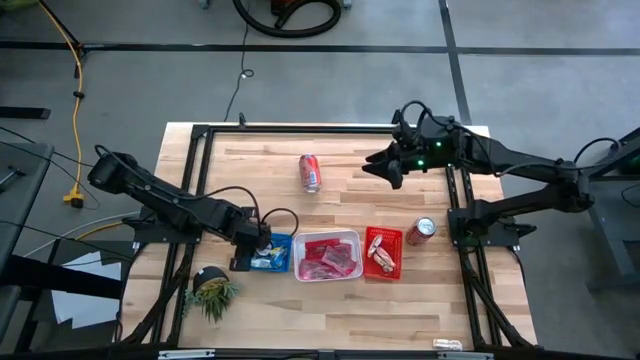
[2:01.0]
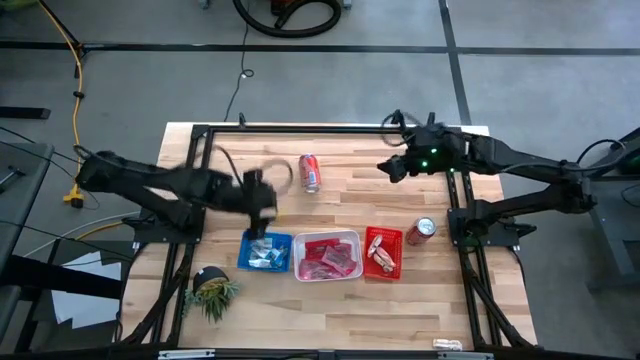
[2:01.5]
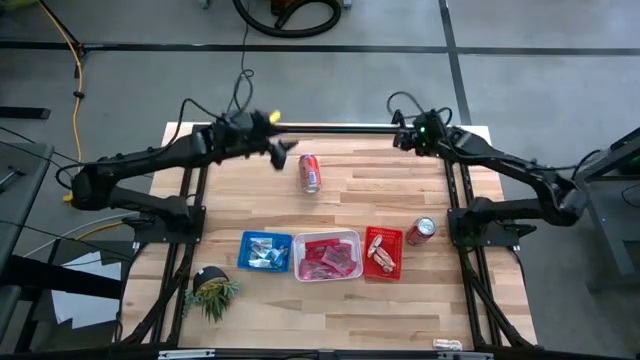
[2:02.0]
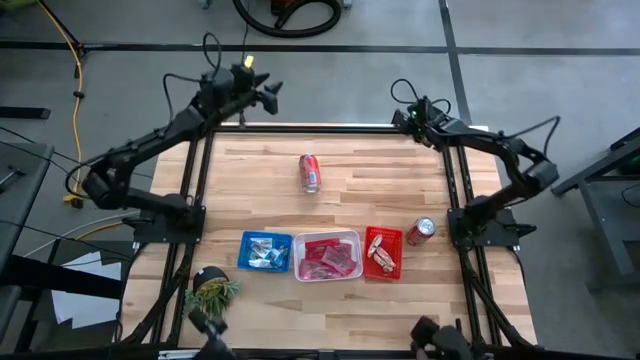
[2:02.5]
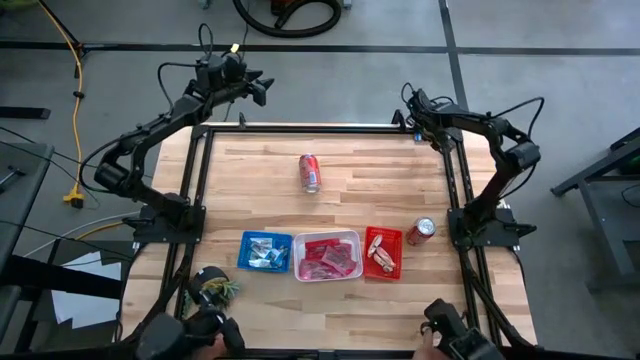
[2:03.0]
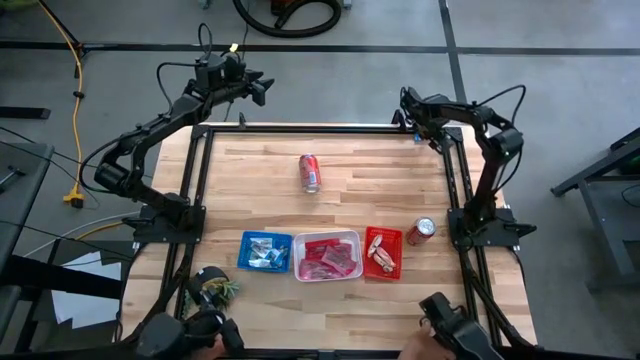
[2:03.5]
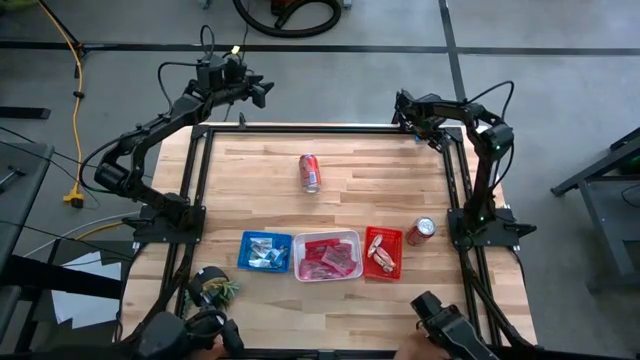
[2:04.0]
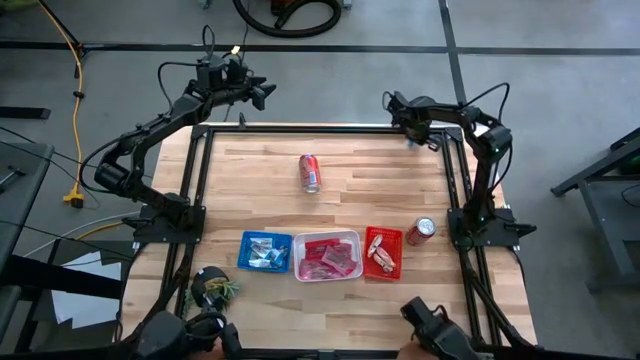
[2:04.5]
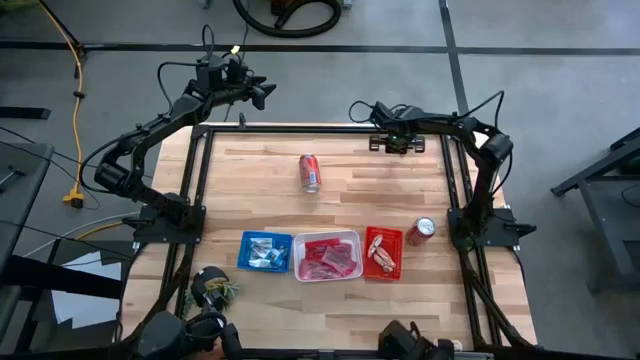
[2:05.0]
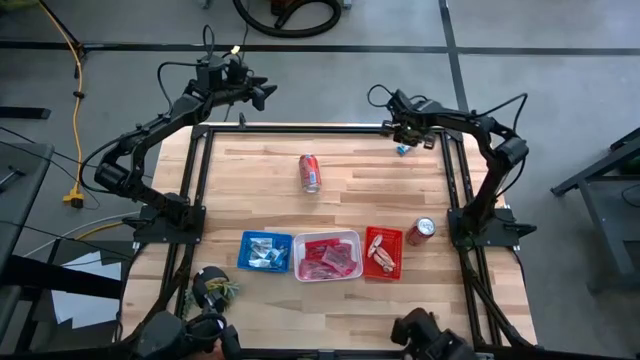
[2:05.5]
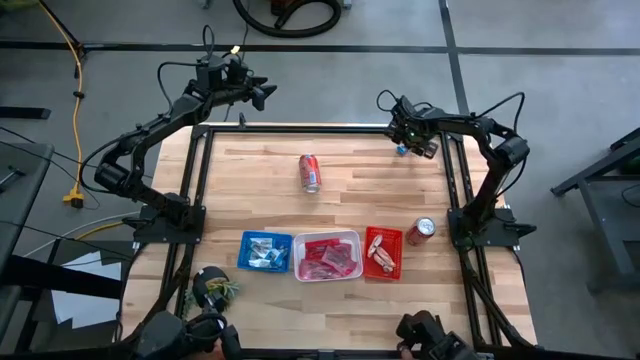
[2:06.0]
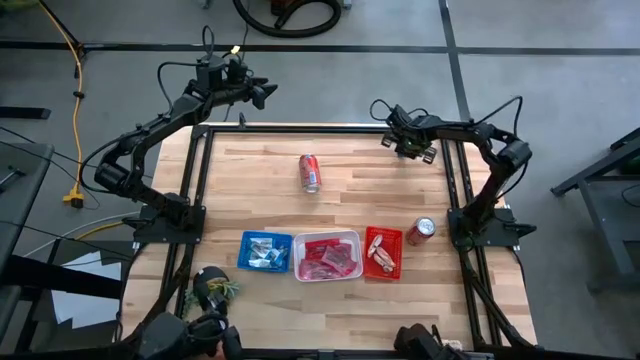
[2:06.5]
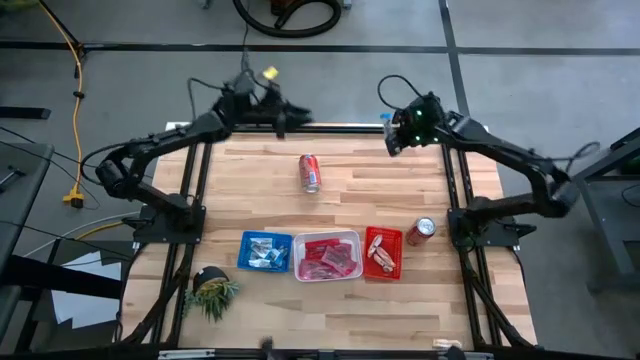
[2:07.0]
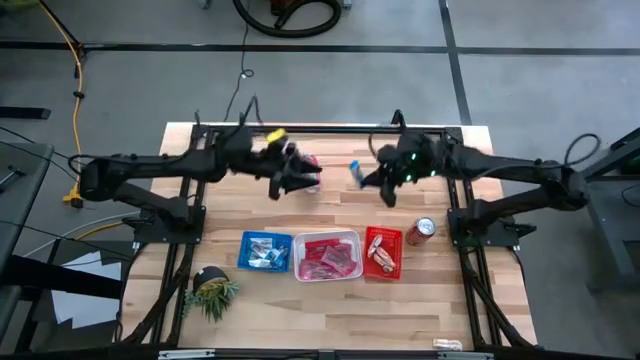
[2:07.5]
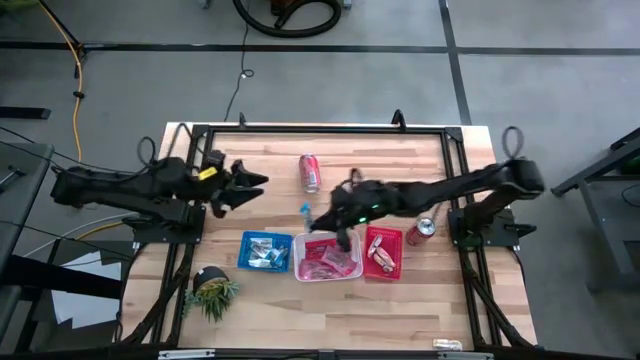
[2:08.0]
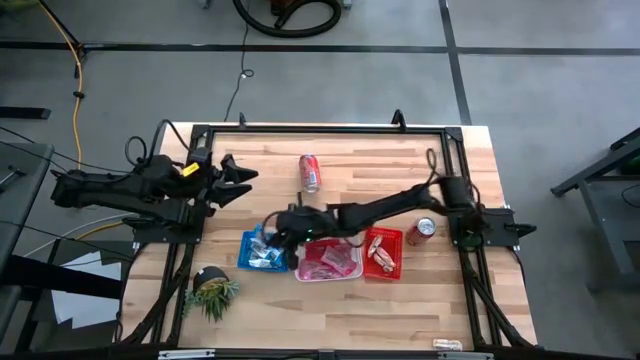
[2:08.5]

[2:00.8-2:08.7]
Task: Sort candy
Put the white chocolate into the blue bin

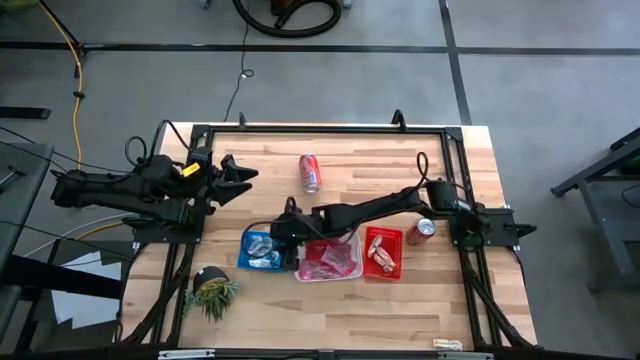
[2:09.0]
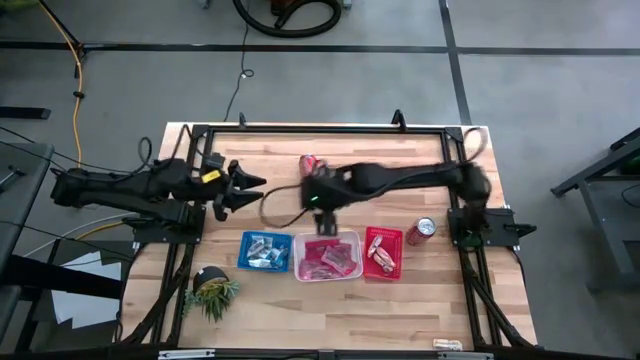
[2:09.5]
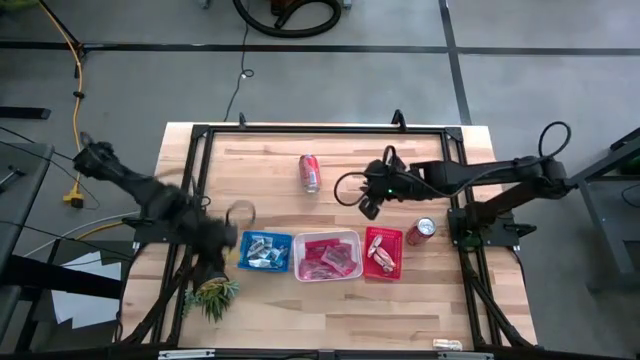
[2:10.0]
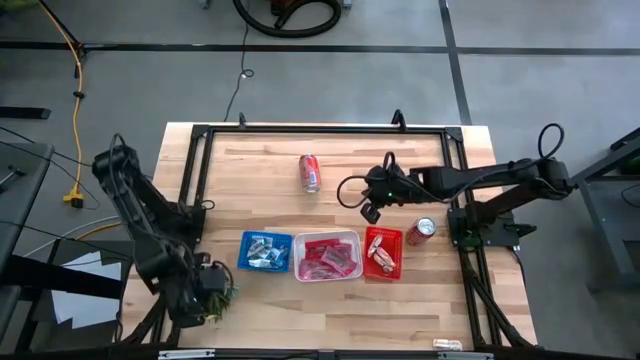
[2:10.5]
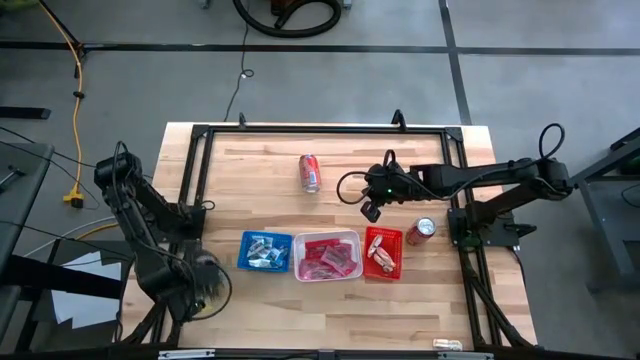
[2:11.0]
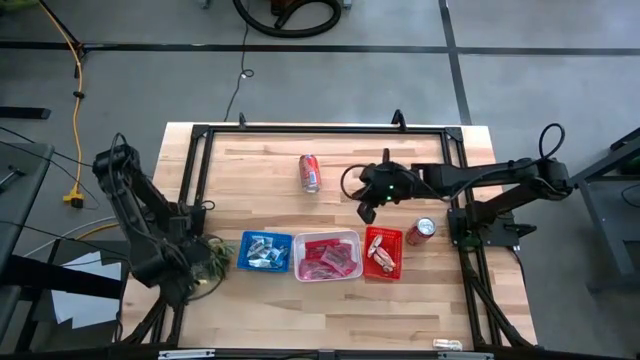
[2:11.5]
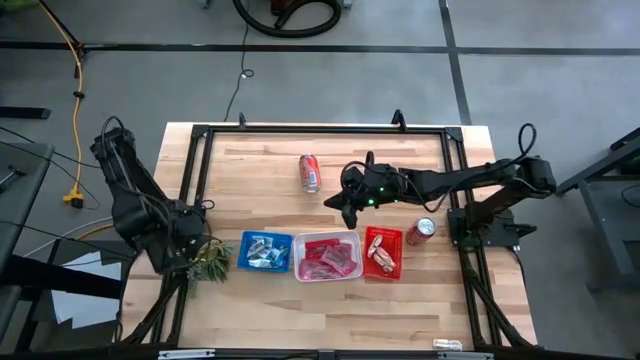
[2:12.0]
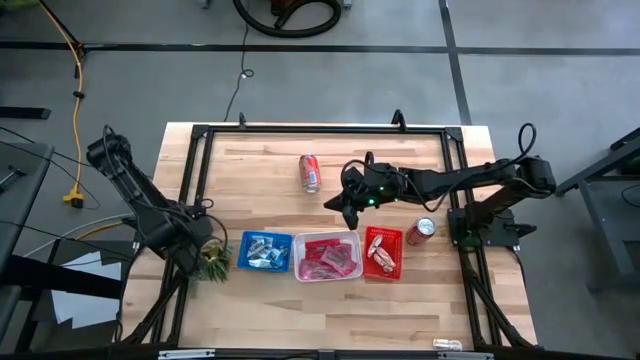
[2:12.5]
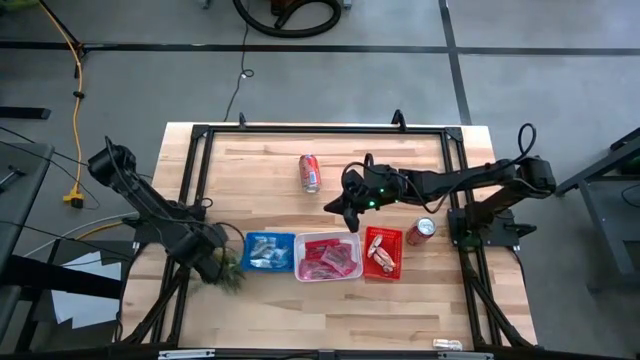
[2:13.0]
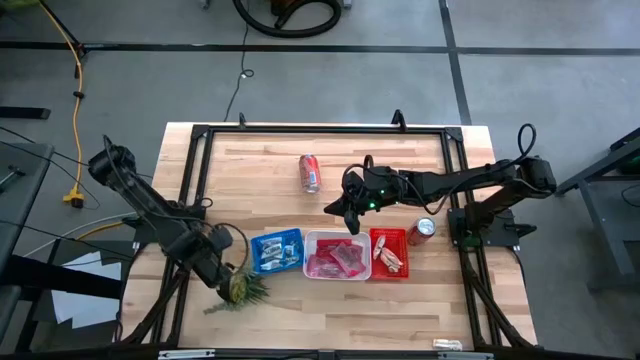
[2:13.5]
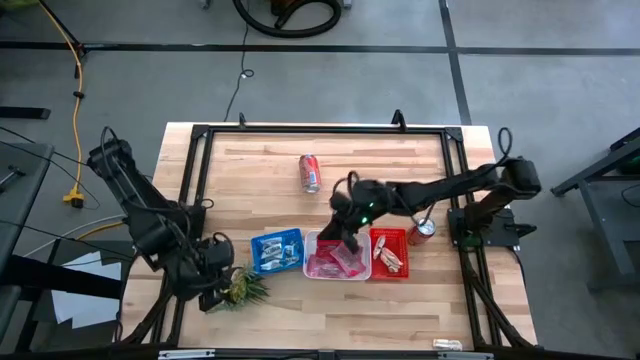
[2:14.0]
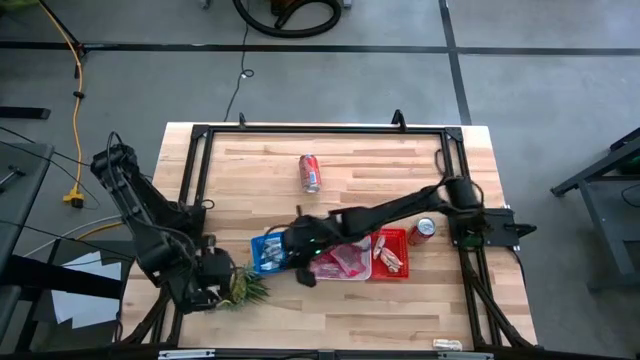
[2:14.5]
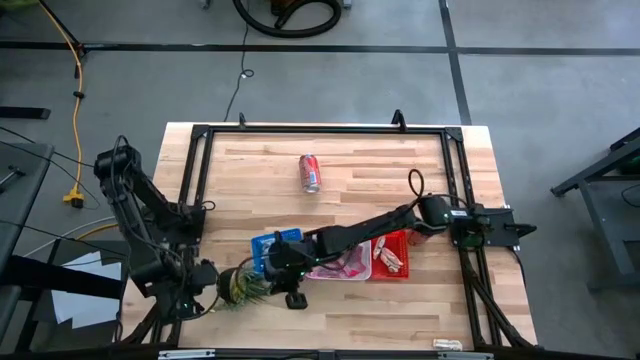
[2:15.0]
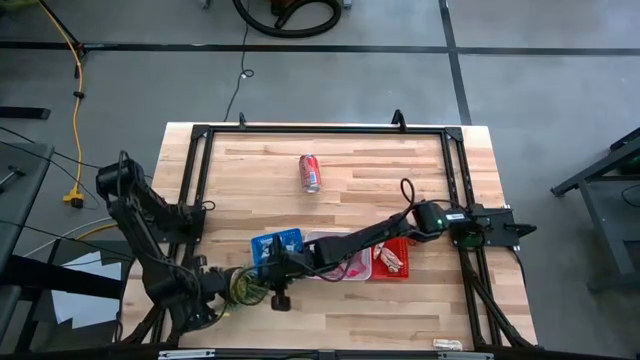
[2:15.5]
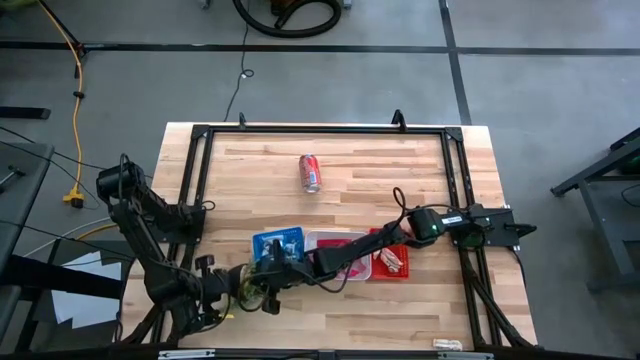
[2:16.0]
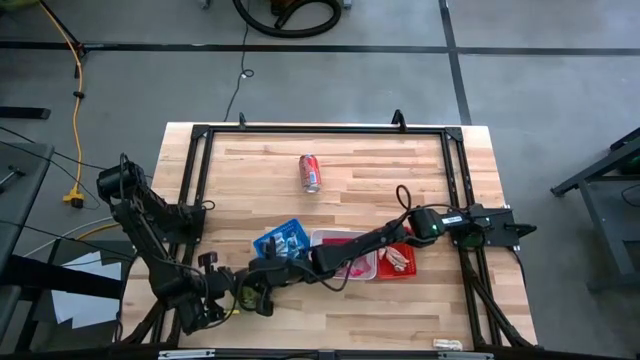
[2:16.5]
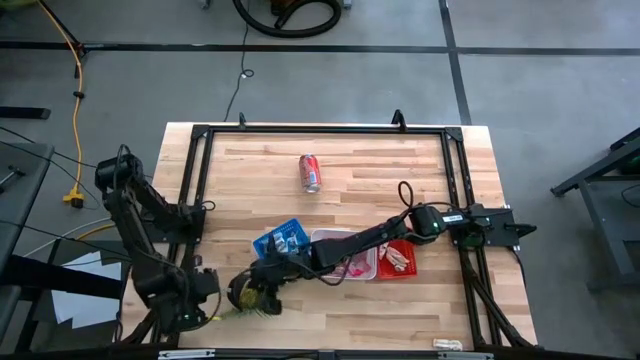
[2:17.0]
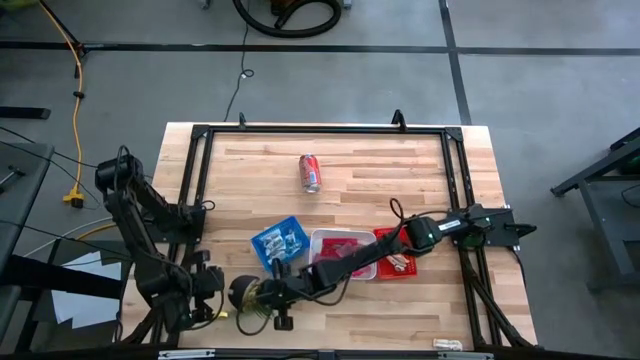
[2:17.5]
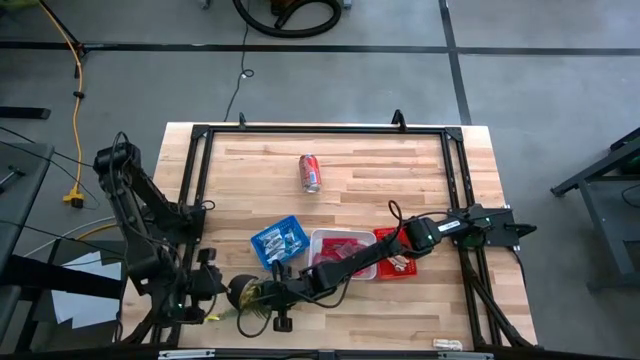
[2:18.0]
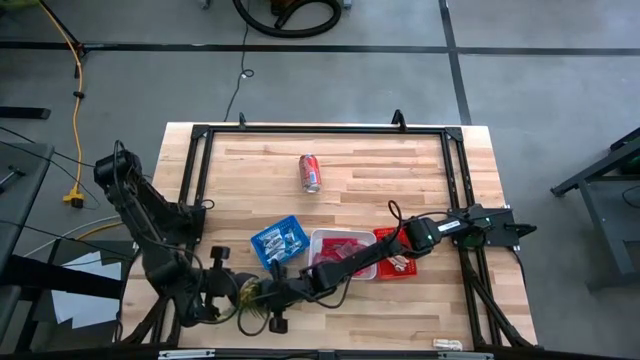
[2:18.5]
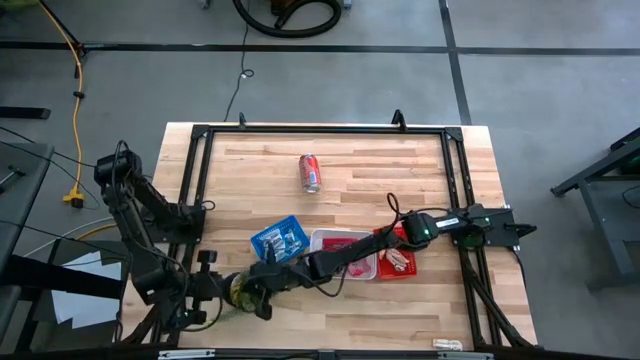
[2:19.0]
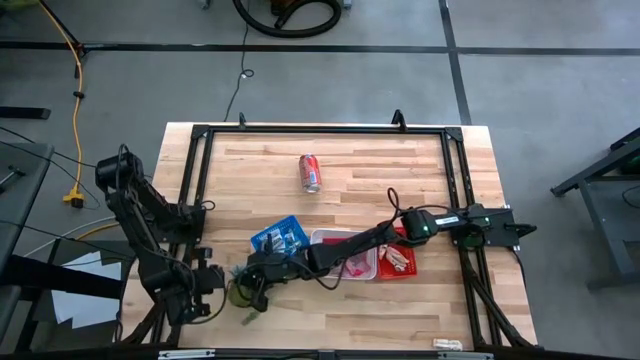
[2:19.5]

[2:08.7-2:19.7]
Adjust the flower pot on the table

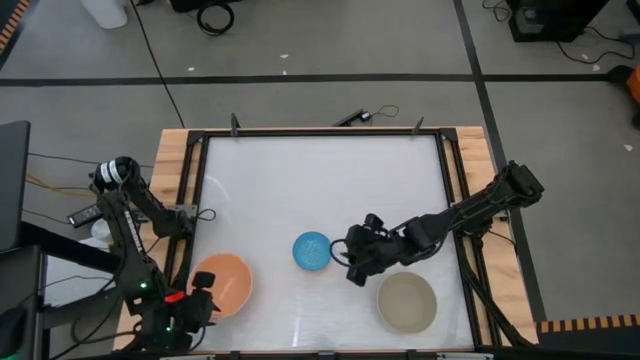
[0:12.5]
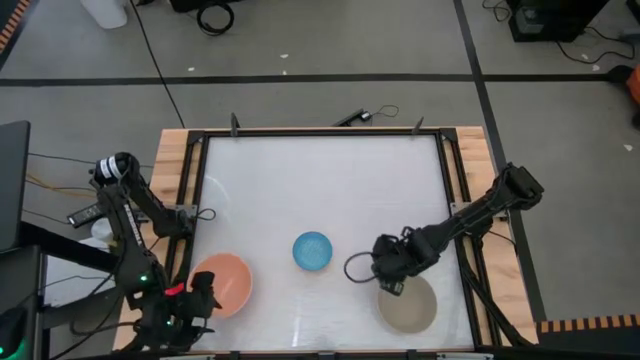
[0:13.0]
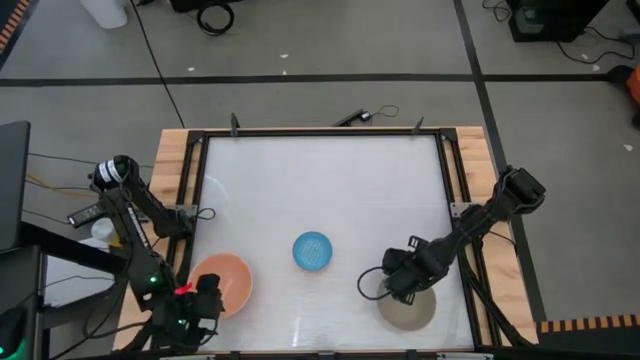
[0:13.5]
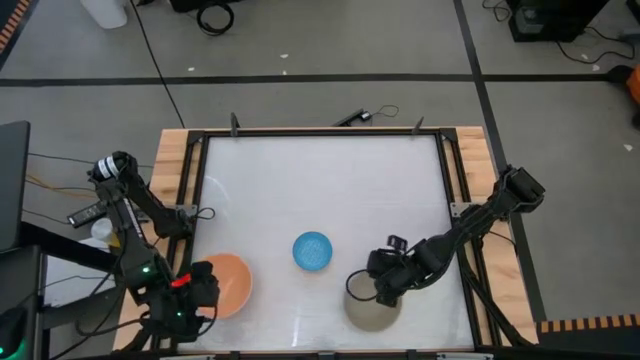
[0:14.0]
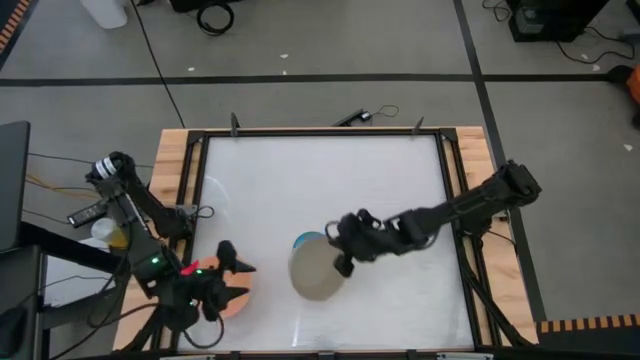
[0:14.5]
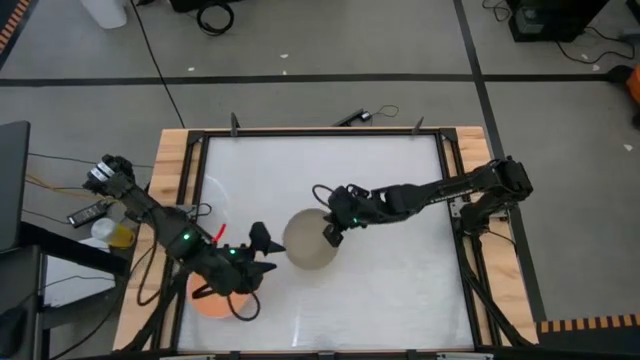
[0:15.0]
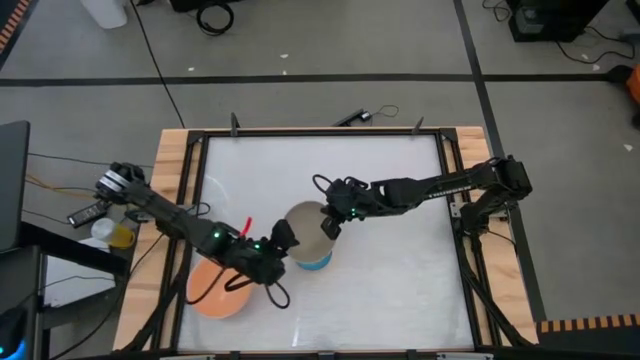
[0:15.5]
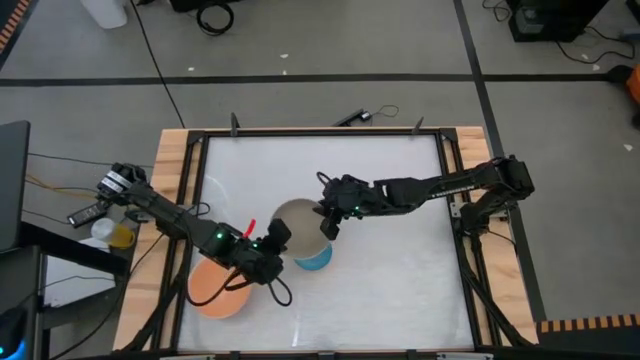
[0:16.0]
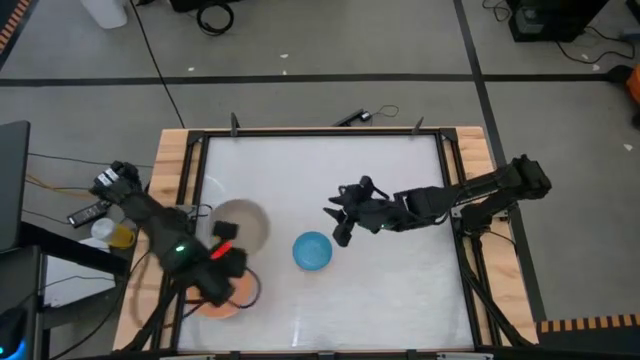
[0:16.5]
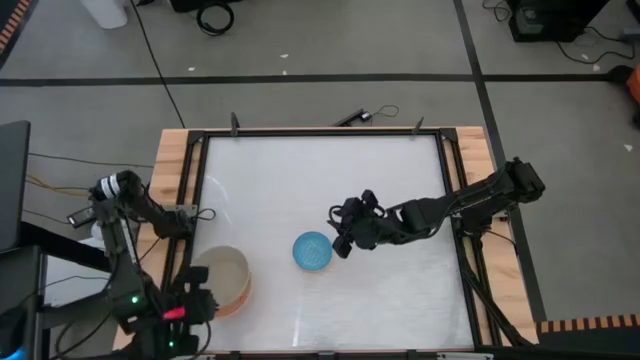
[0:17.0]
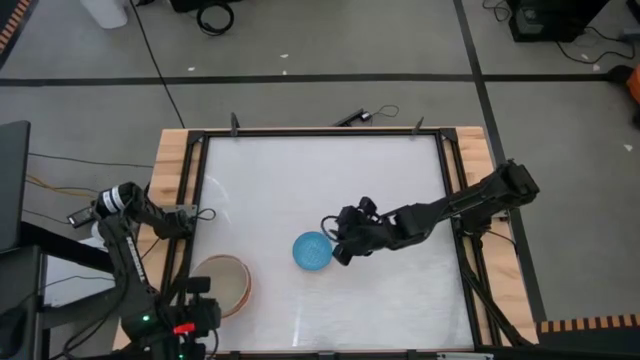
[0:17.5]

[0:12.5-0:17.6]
Task: Nest bowls inside each other by size order
Stack the gray bowl on the orange bowl
